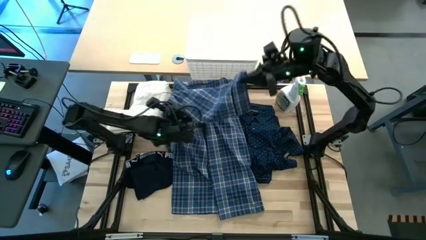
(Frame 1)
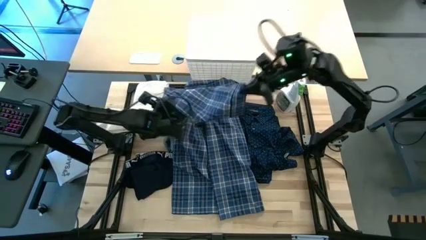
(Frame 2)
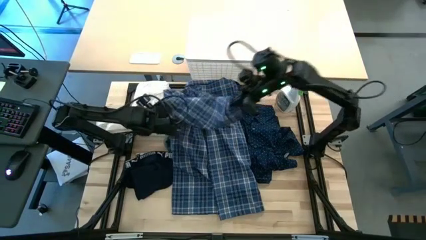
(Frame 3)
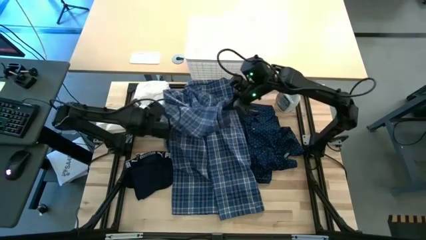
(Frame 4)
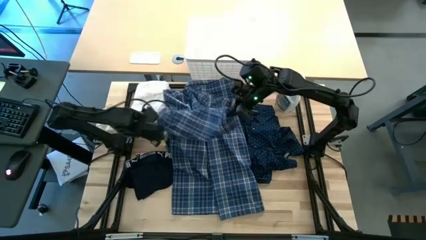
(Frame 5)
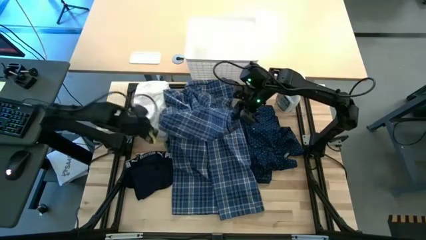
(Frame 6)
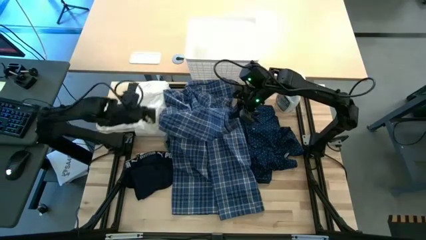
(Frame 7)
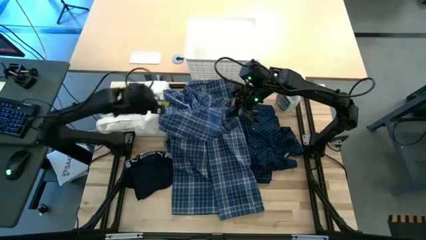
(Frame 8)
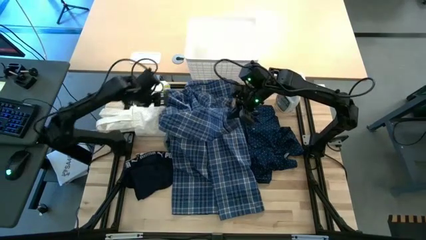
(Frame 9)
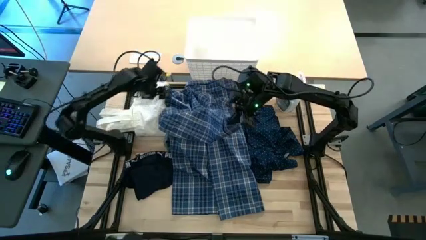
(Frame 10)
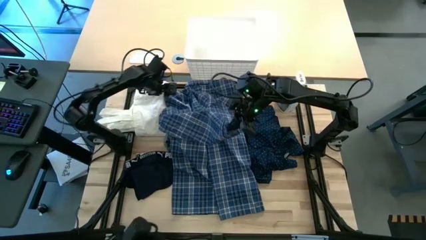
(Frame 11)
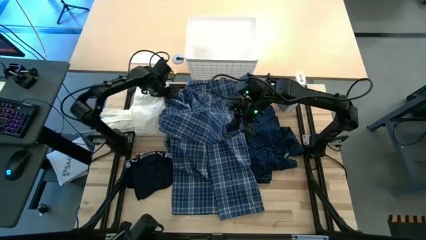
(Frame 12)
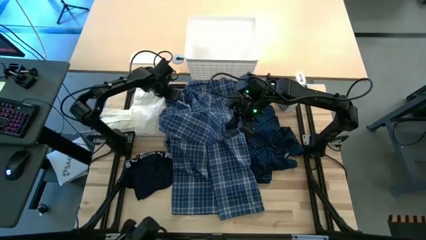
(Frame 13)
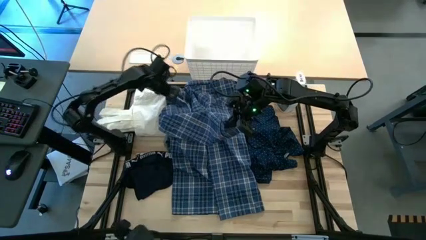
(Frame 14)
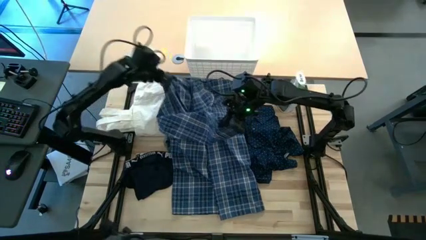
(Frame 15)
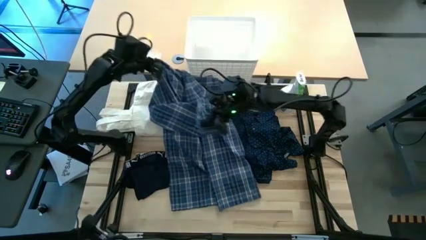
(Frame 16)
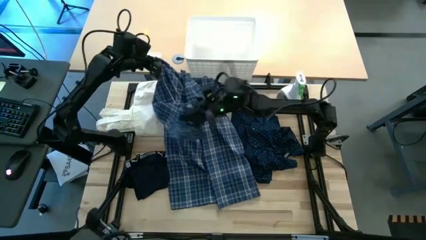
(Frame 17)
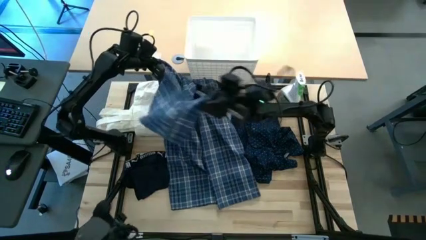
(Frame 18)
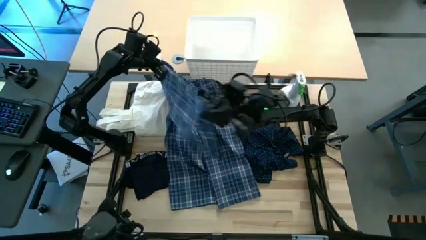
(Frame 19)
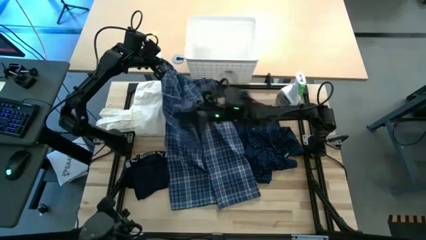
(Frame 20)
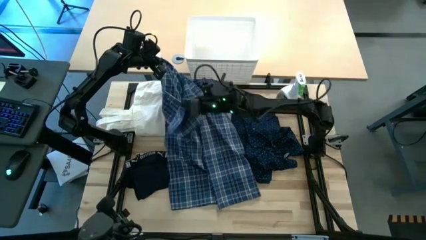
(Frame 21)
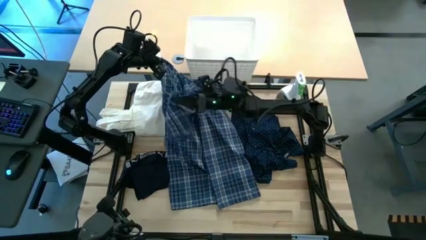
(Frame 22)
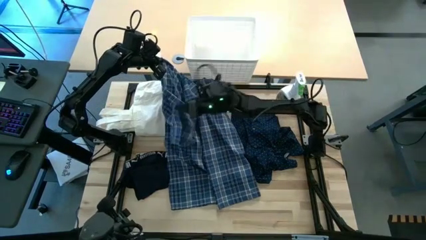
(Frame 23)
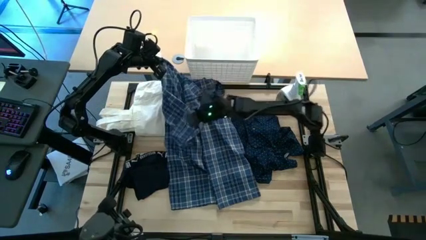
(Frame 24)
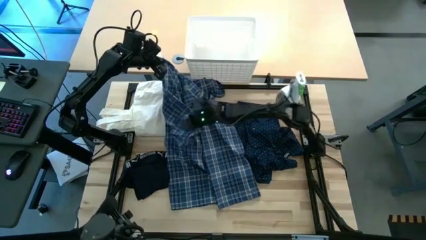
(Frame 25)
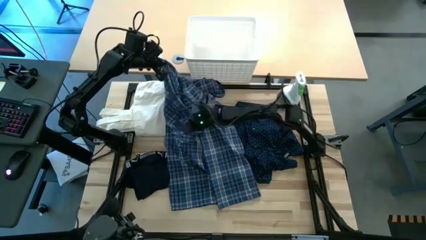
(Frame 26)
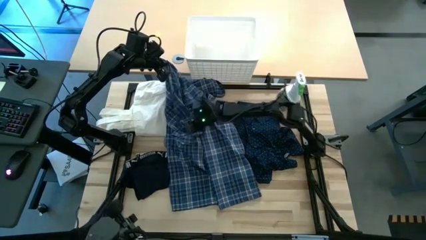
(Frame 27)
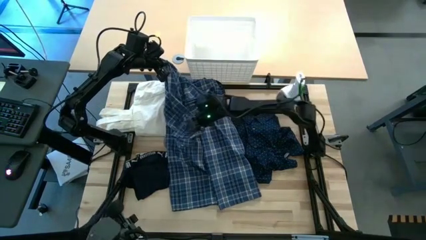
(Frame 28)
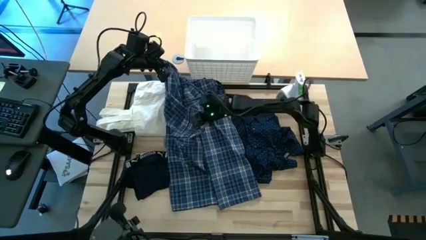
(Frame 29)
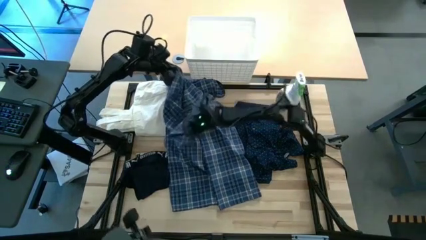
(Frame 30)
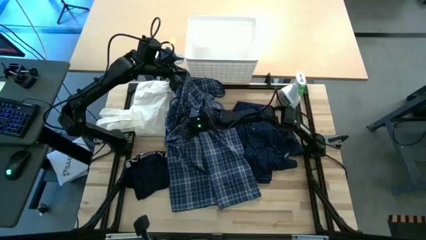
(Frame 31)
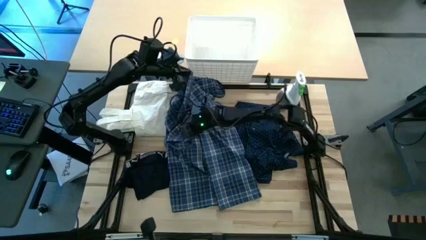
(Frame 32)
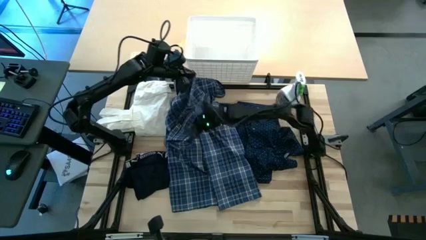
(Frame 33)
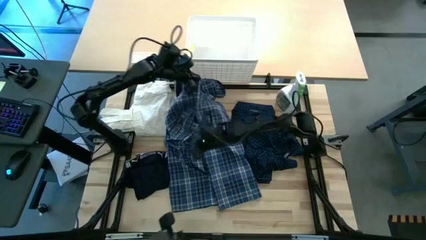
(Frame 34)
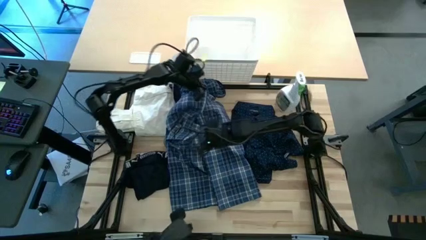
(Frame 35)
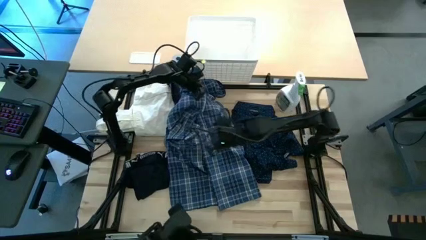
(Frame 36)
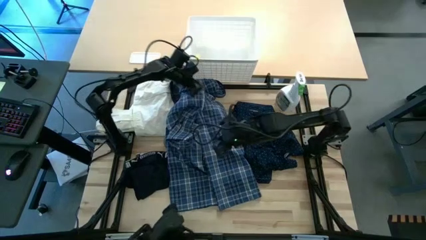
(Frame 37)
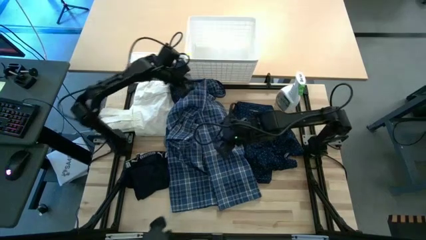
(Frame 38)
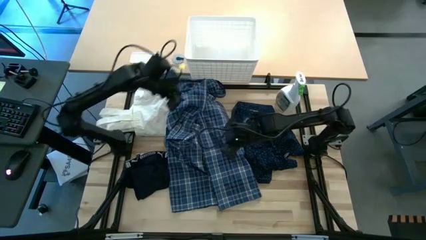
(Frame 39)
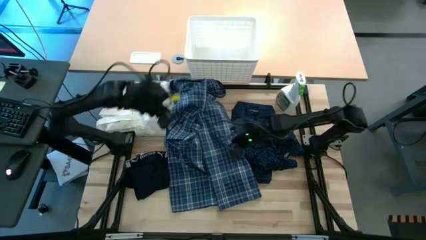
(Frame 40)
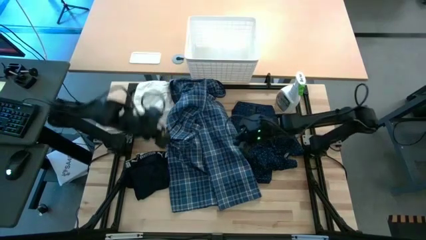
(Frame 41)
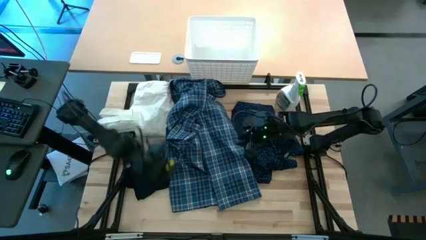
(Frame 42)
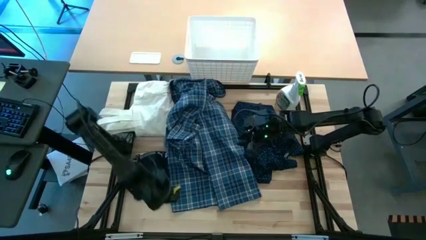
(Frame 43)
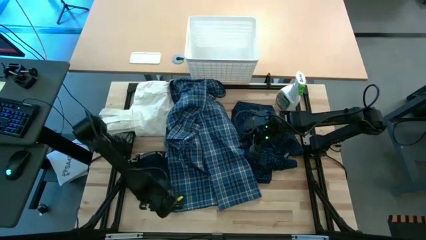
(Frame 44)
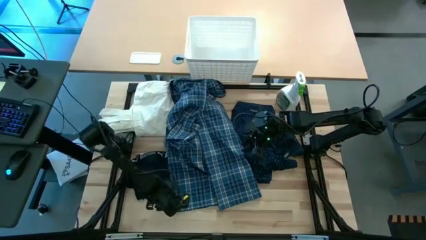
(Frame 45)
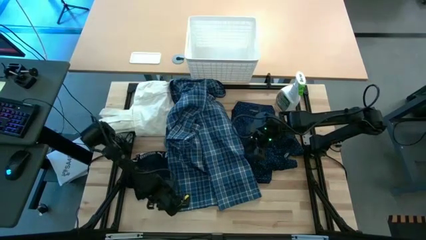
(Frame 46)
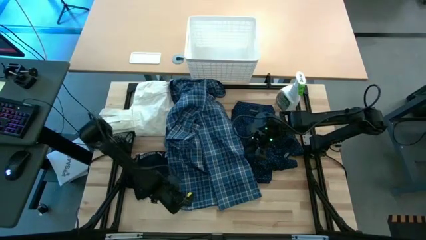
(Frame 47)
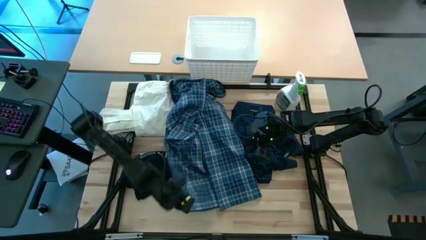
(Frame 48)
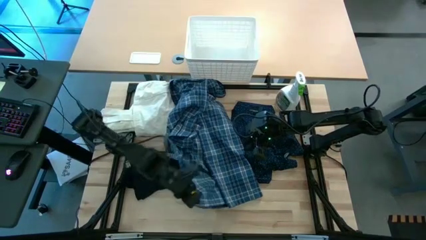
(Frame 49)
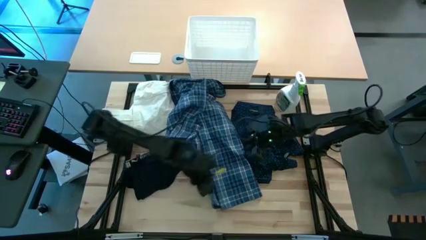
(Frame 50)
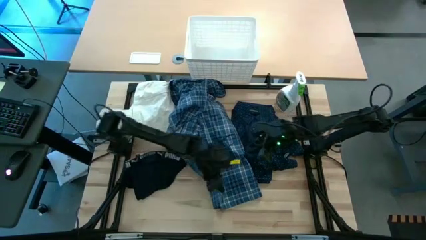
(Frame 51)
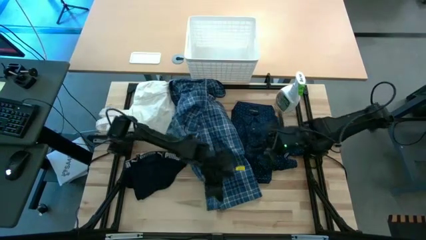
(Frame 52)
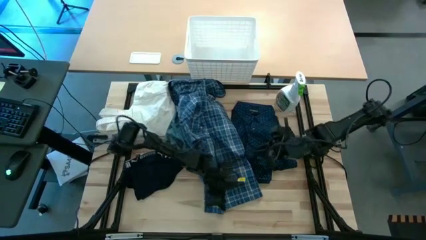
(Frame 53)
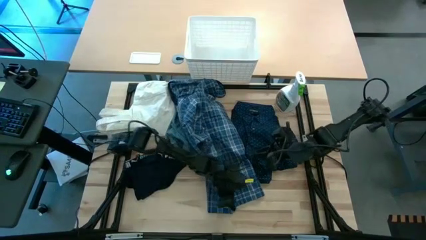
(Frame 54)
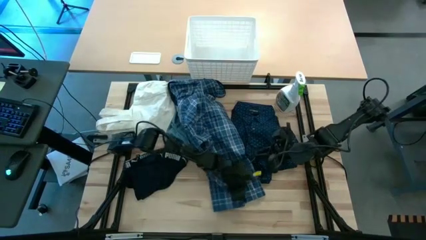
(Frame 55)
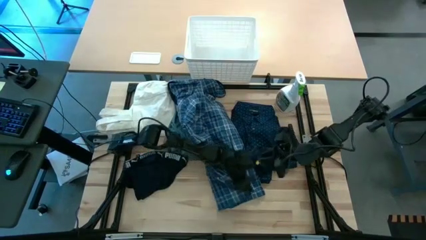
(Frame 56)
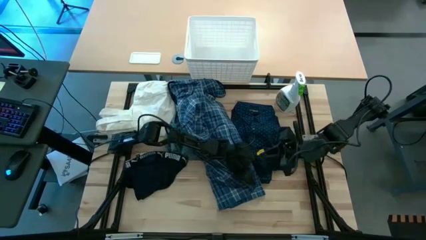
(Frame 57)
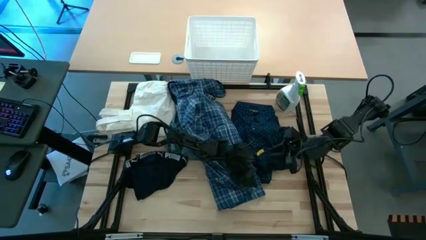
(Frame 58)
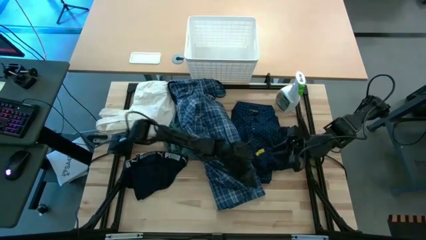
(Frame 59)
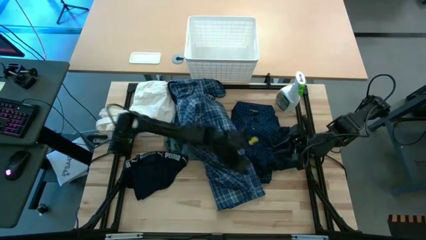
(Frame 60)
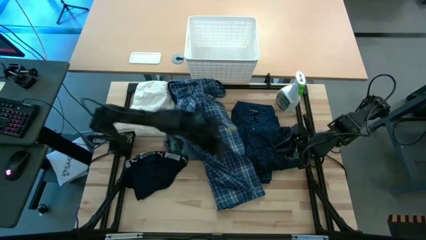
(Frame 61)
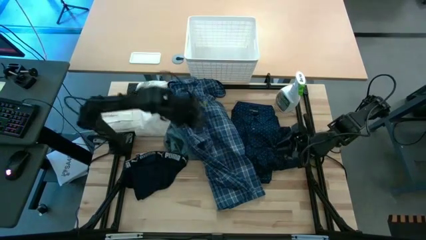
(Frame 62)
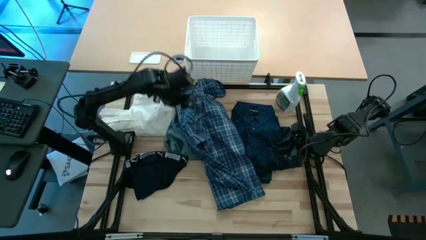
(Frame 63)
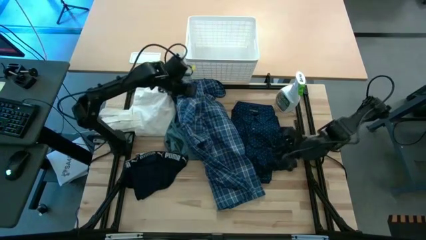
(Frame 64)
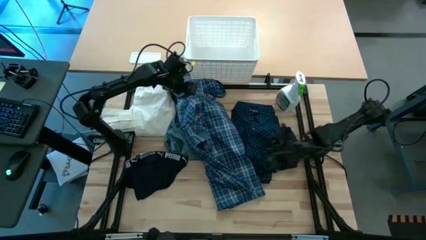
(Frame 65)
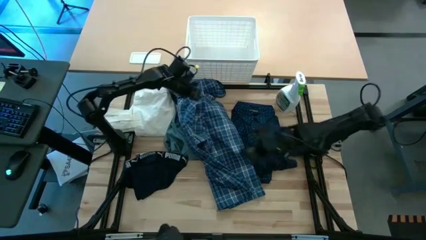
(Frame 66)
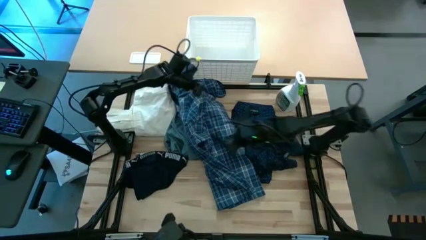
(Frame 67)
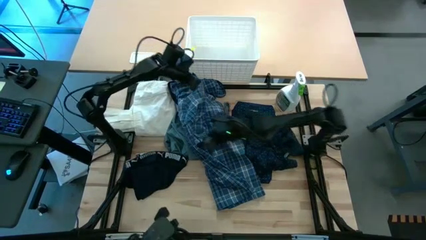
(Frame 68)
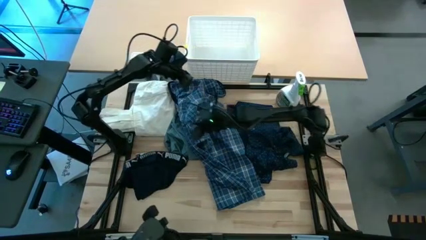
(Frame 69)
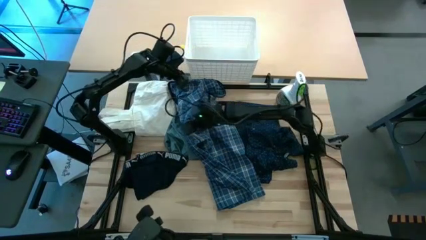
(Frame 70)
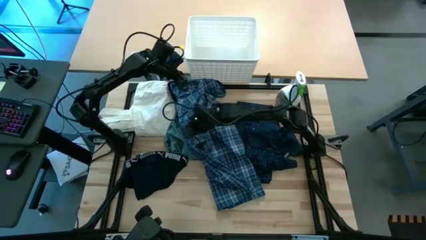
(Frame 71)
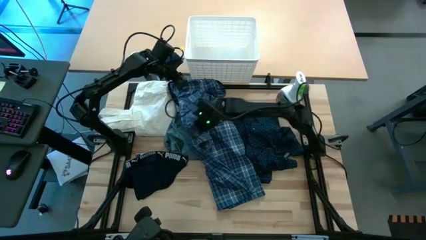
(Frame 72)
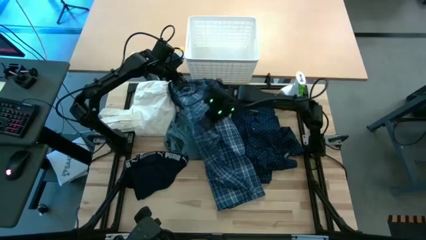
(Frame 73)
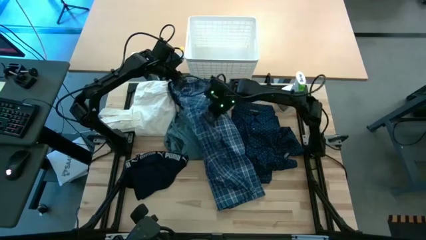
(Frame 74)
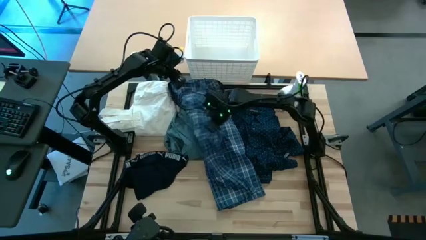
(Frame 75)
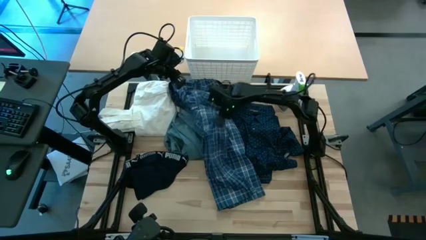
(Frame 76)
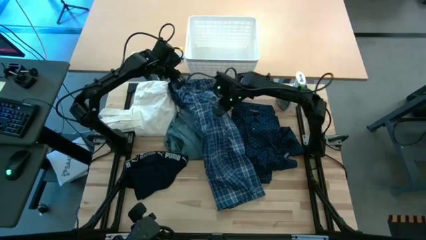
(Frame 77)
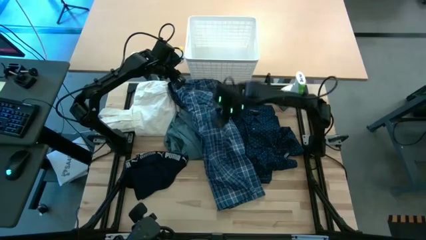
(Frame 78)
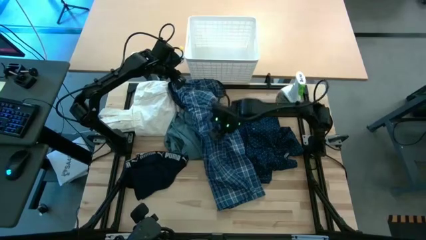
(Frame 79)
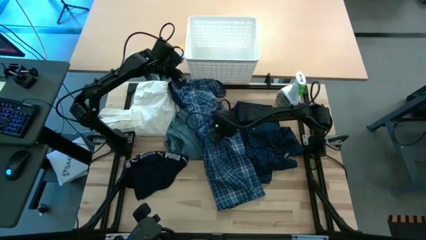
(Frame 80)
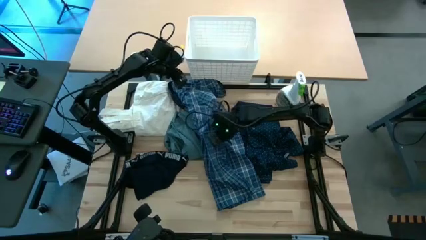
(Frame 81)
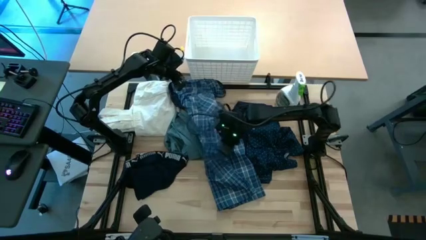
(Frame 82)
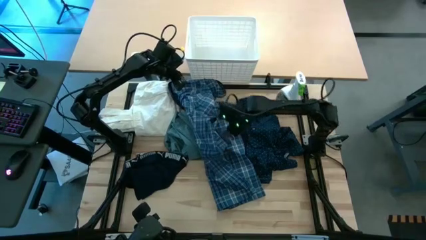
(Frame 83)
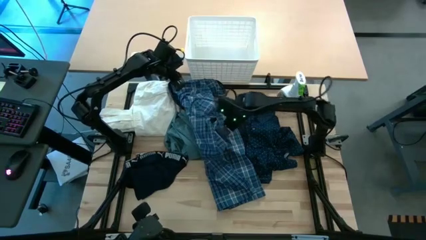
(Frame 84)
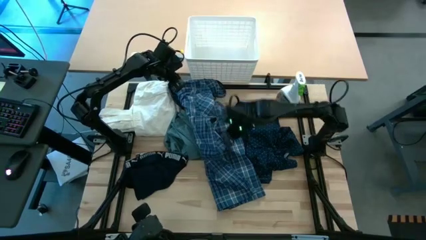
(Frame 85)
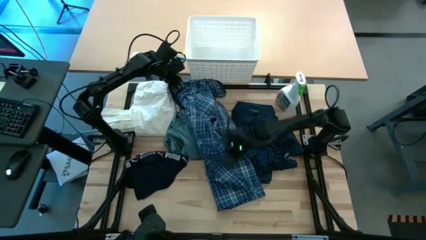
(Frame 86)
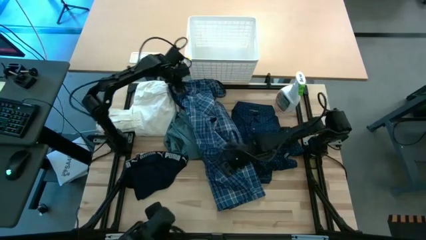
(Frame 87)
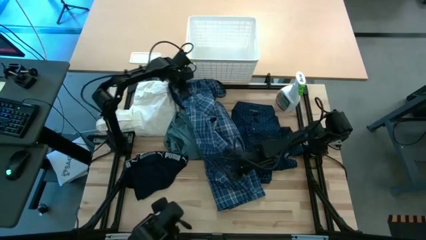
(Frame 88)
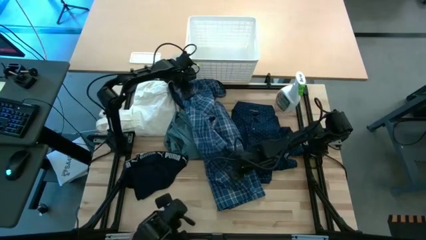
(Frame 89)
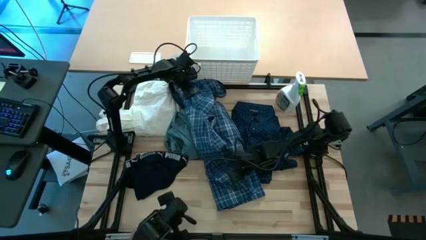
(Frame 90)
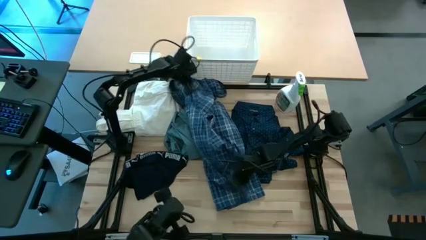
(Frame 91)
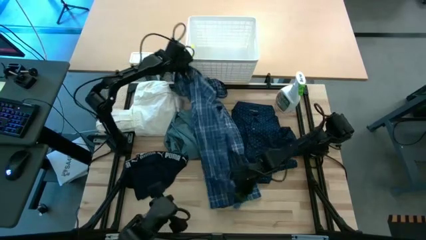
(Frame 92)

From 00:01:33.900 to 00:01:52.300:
Fold the checkered blue polo
